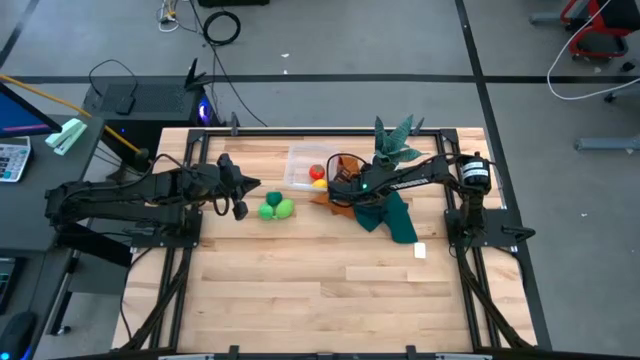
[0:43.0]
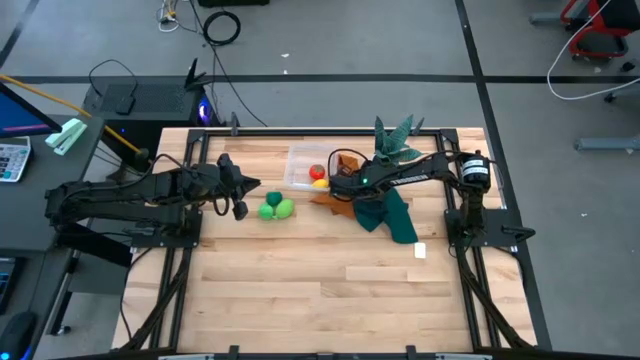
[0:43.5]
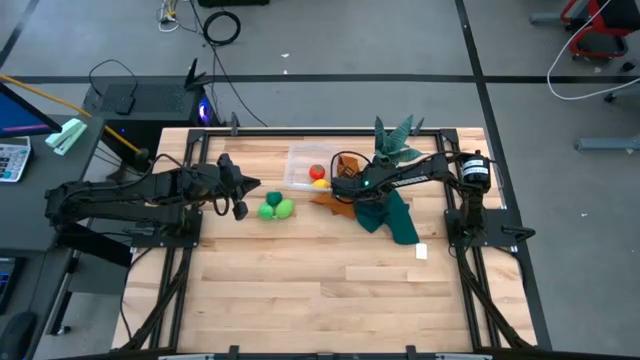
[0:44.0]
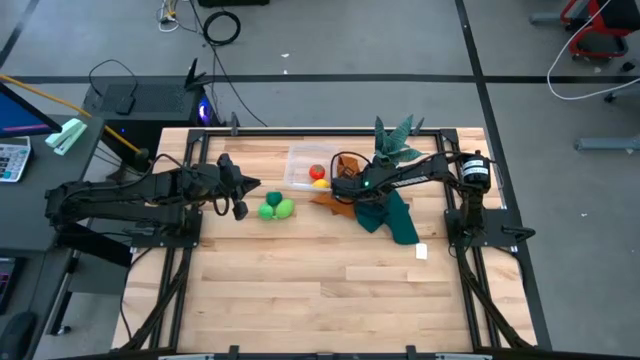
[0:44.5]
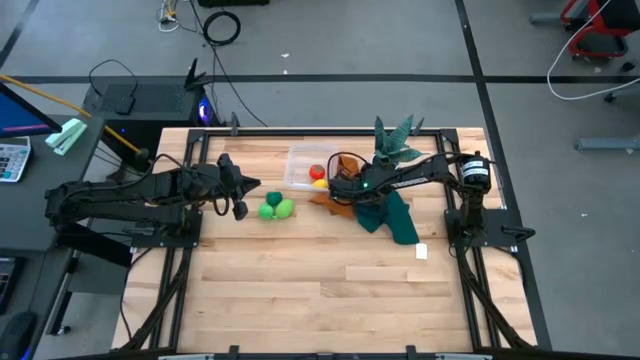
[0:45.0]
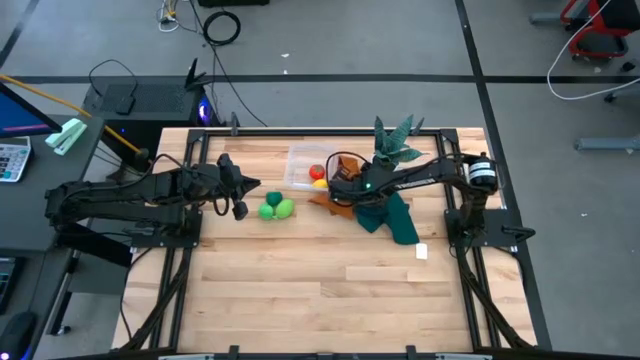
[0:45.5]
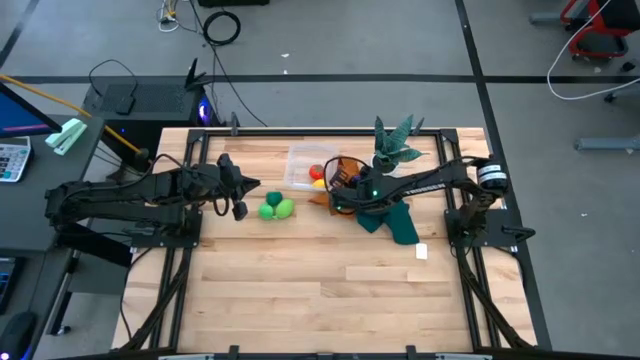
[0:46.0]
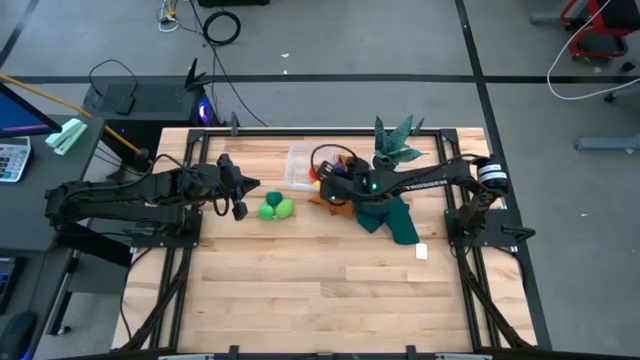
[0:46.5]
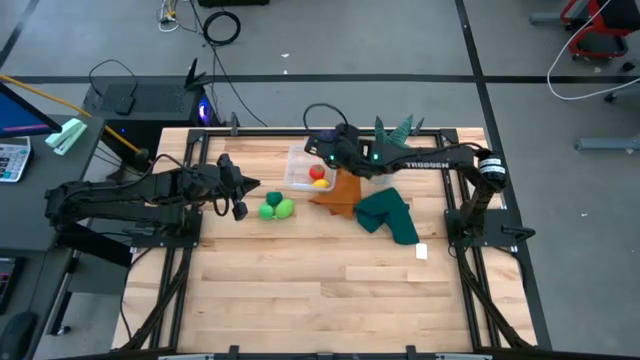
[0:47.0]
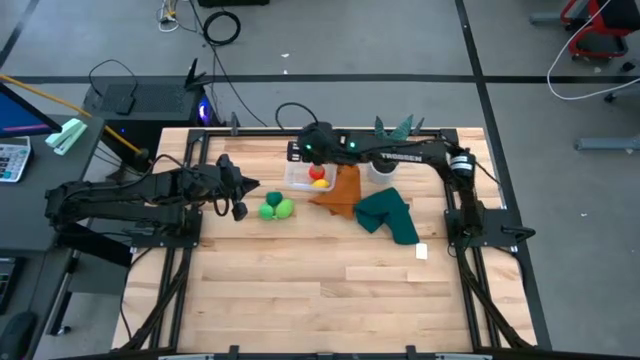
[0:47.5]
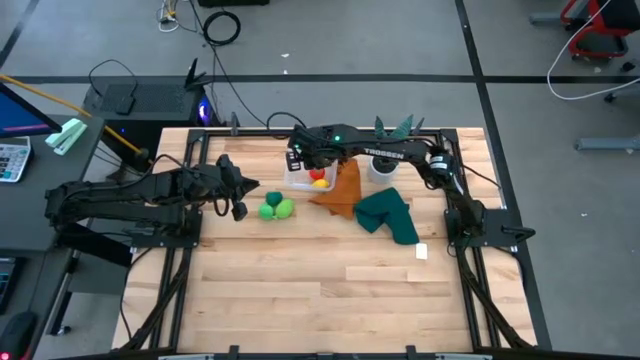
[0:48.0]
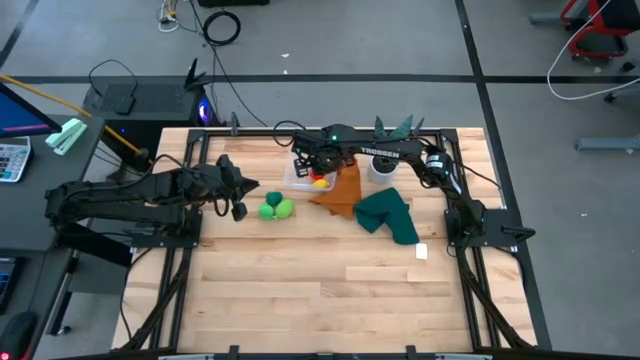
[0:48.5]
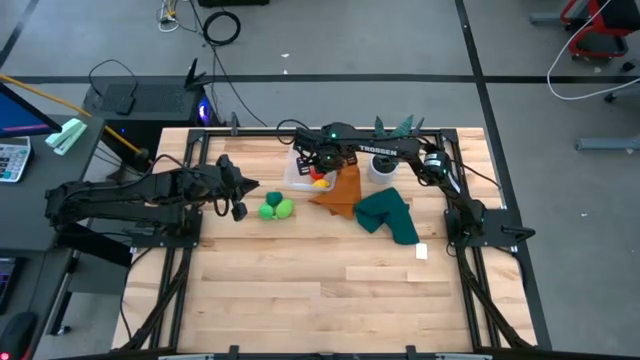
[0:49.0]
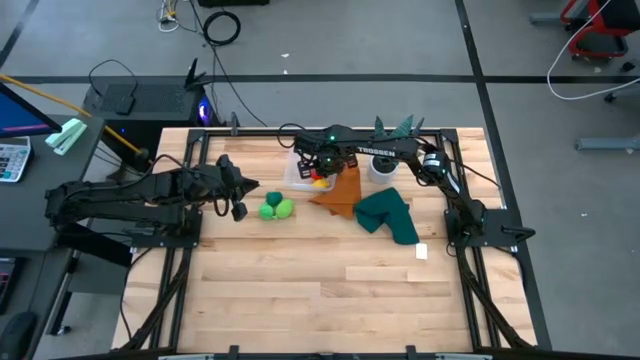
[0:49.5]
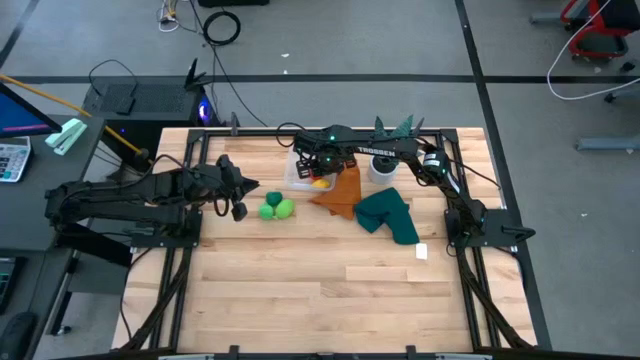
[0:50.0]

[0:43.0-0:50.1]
Task: Pick and placing Produce into tupperware
Put the violet eggplant into the transparent container

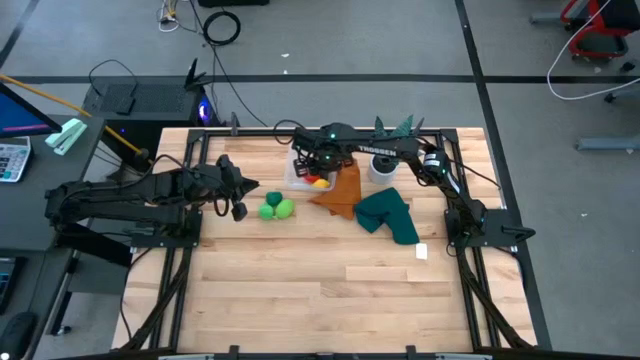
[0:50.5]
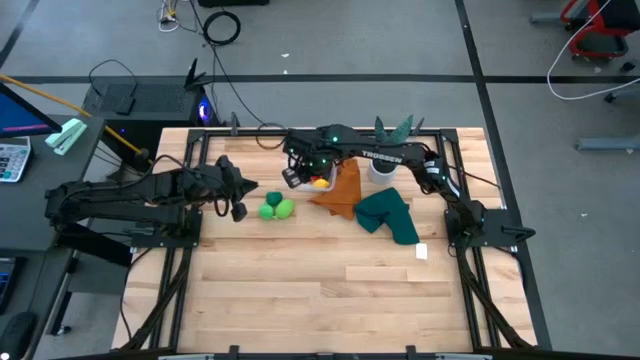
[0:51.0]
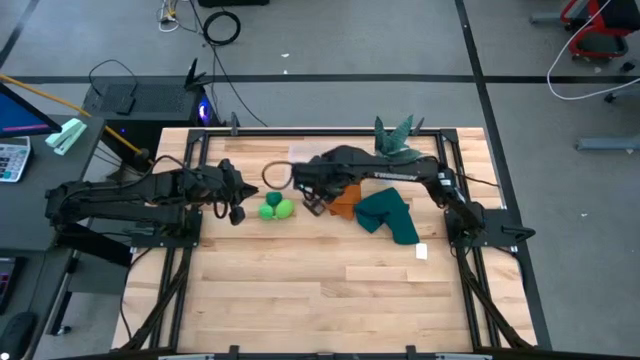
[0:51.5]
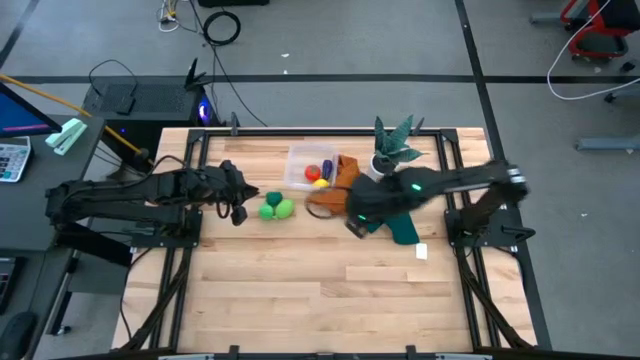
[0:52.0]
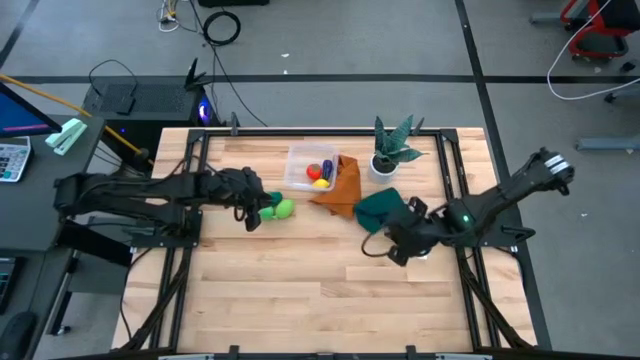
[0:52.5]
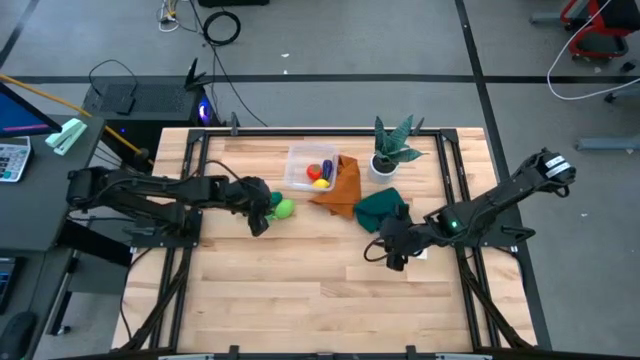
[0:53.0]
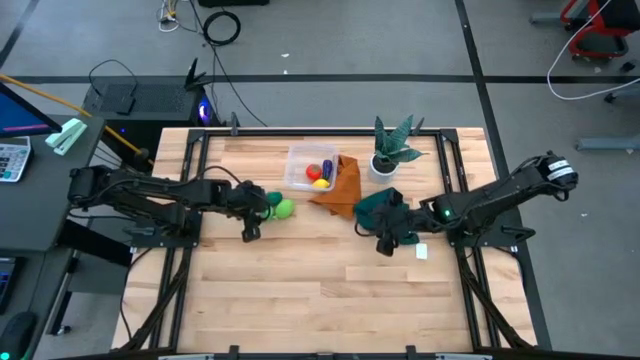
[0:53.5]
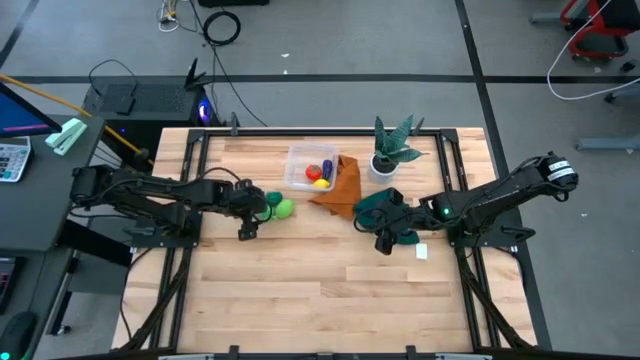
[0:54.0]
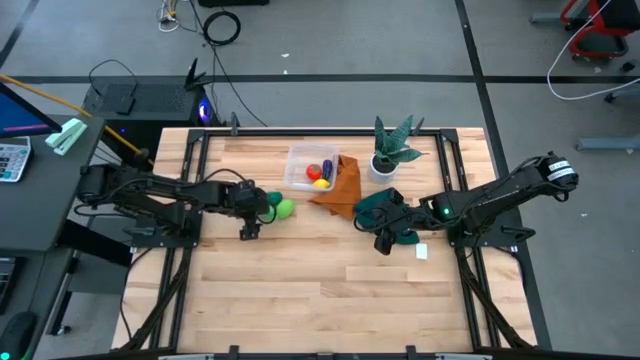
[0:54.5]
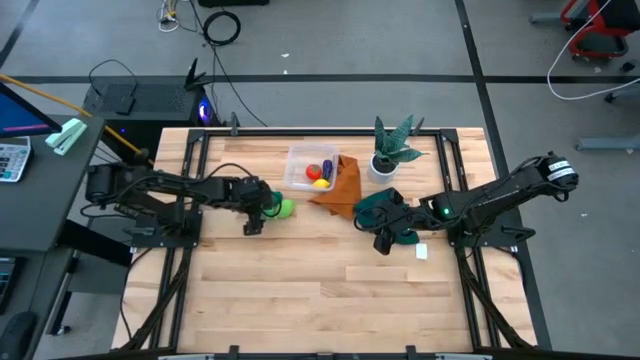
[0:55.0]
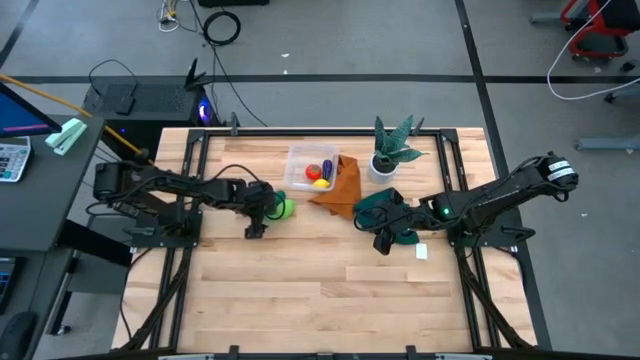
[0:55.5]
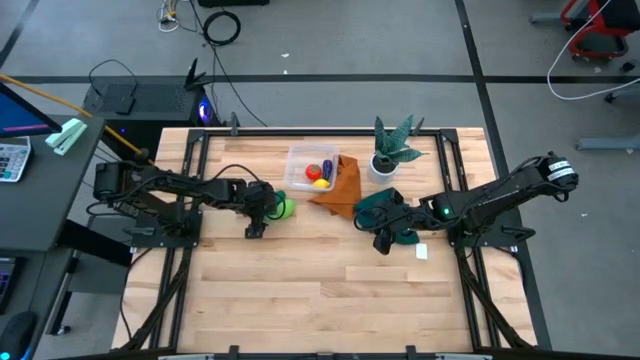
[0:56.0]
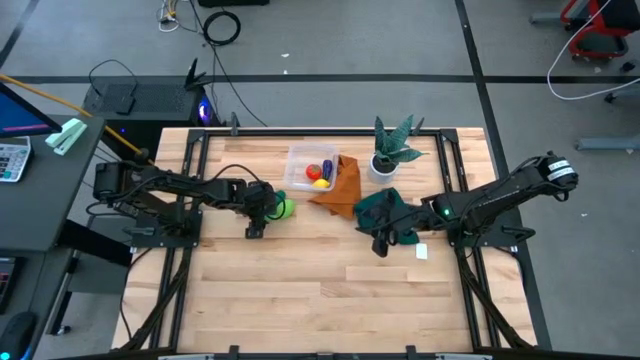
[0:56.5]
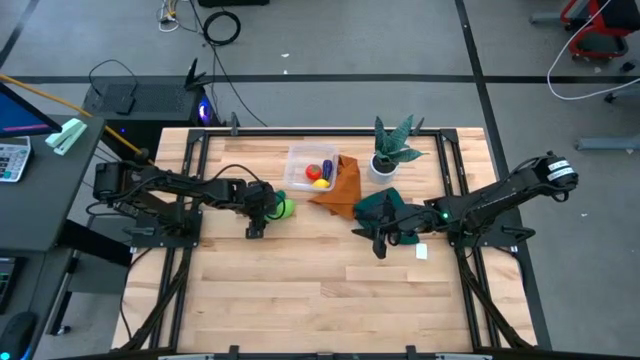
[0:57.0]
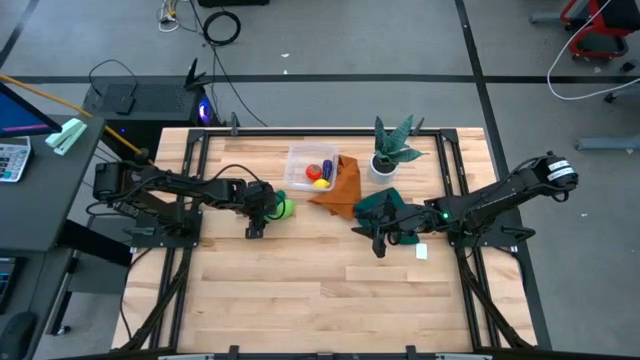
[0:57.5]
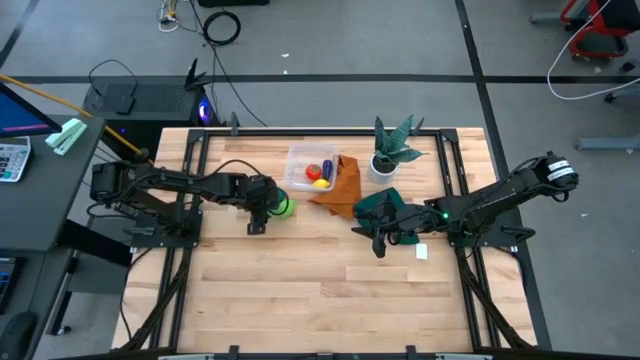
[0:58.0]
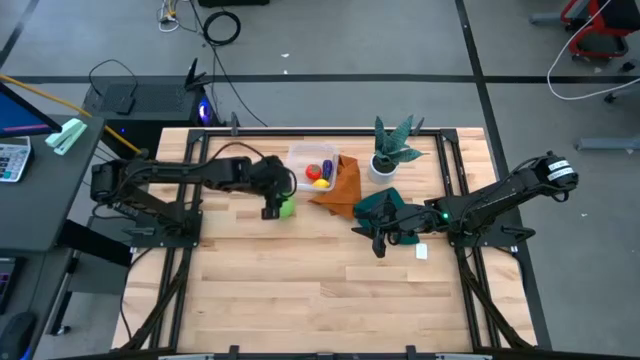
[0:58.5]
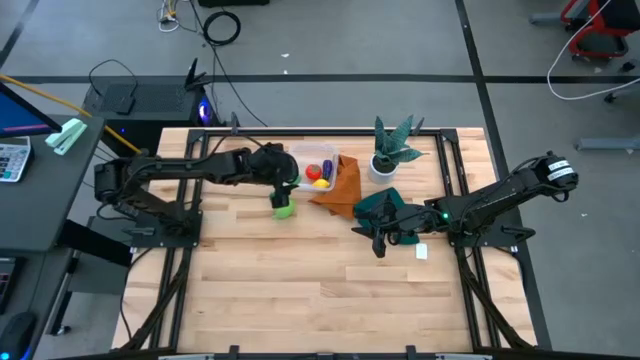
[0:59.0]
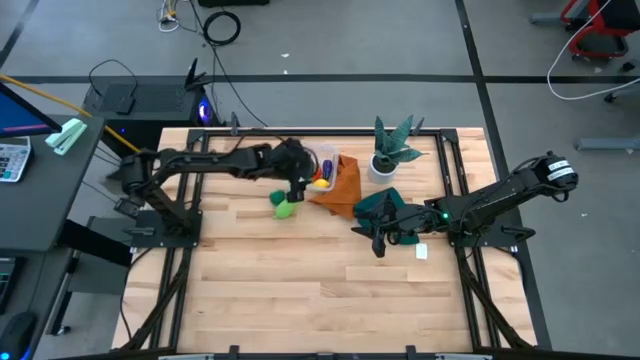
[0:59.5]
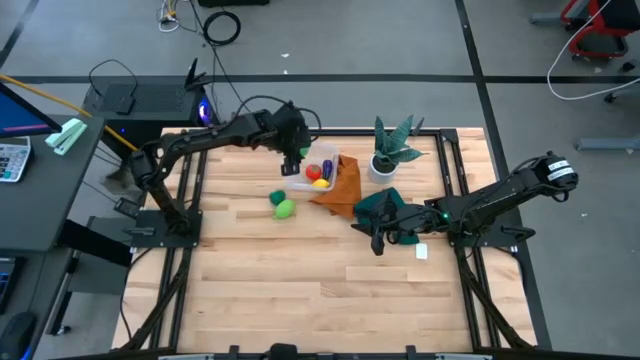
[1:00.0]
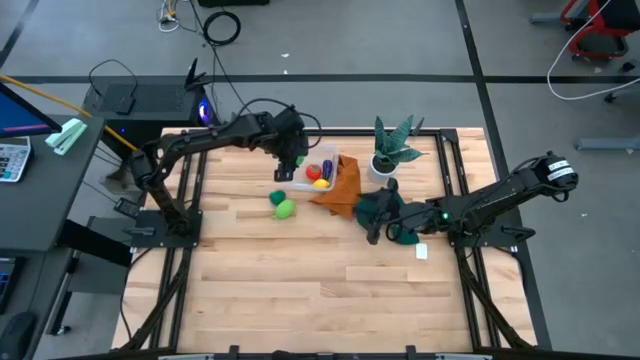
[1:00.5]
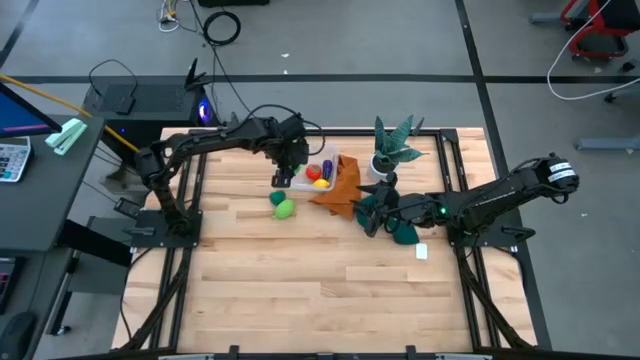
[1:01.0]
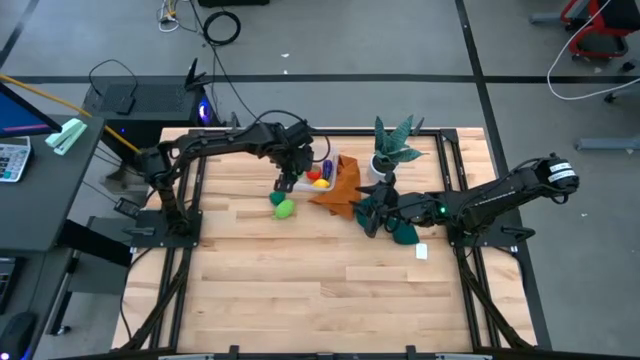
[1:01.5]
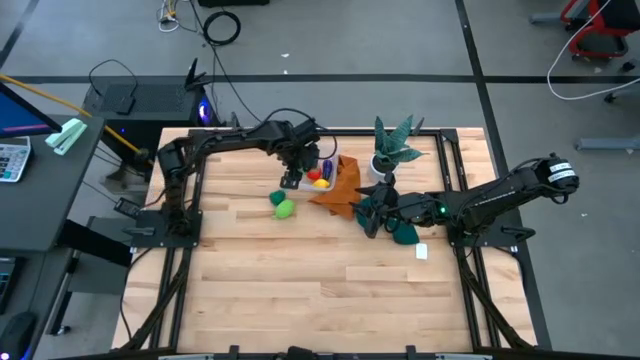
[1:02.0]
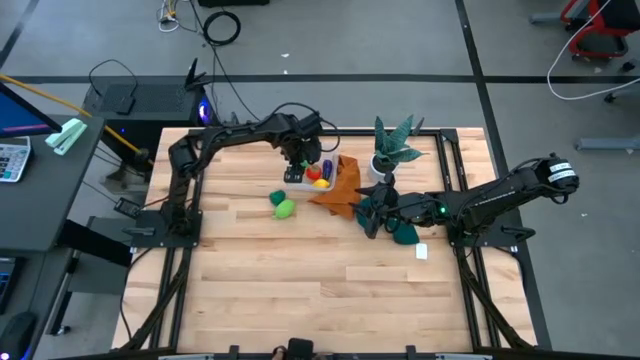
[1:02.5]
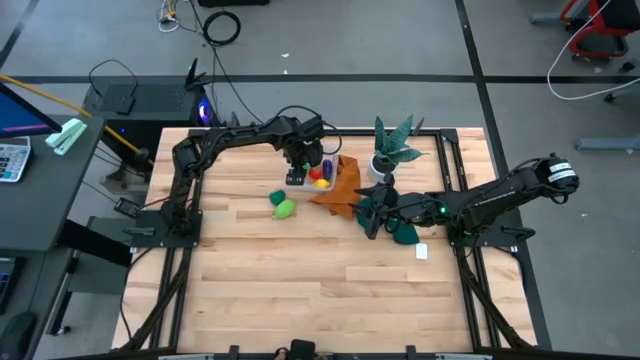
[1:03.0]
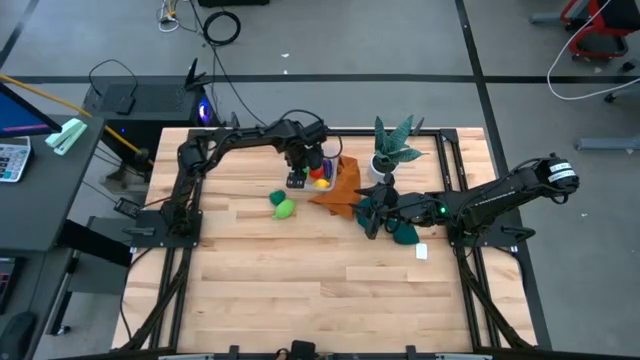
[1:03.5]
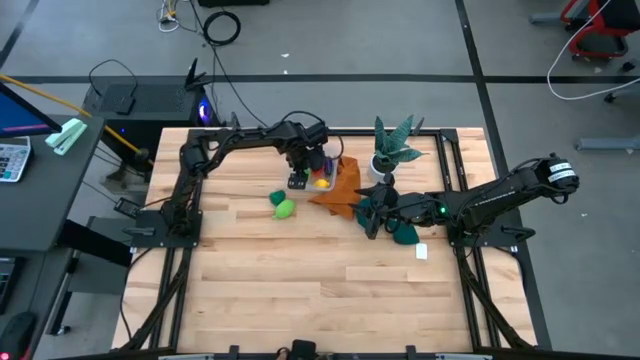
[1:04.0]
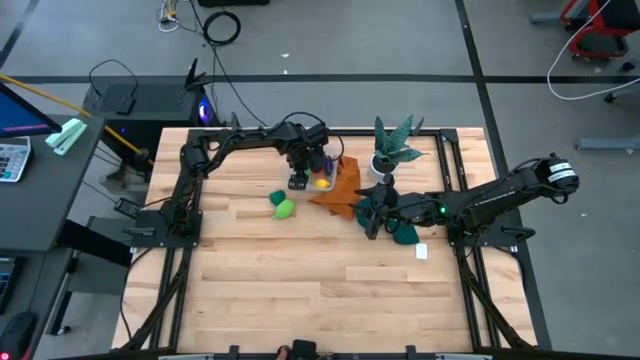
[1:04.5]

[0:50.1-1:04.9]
Put the green apple into the transparent container
